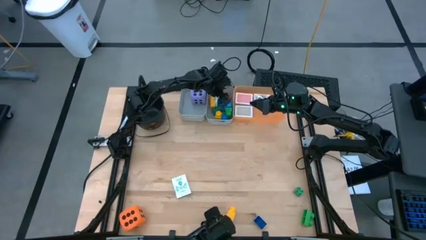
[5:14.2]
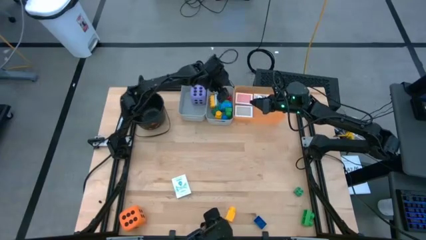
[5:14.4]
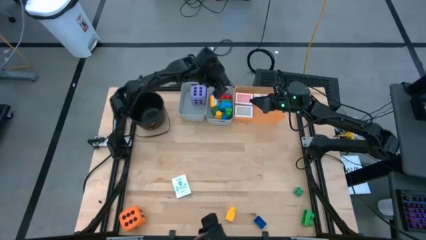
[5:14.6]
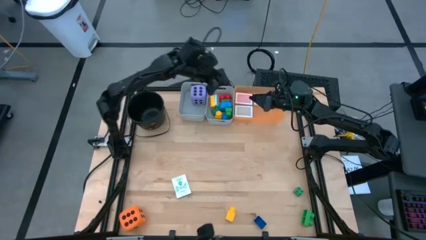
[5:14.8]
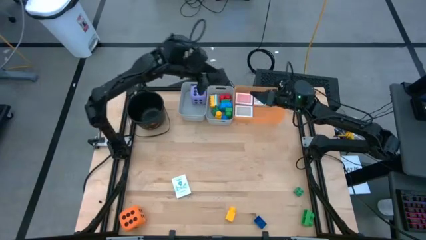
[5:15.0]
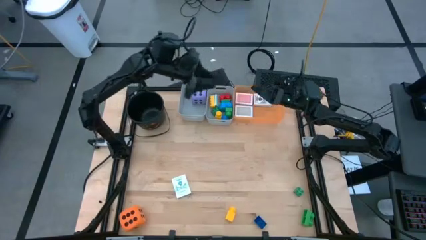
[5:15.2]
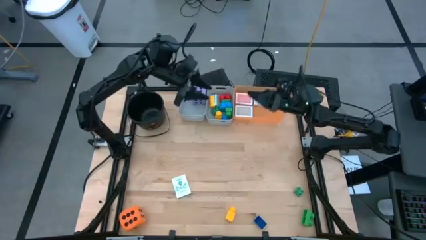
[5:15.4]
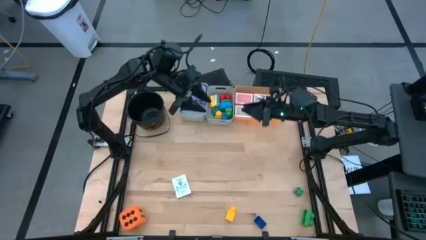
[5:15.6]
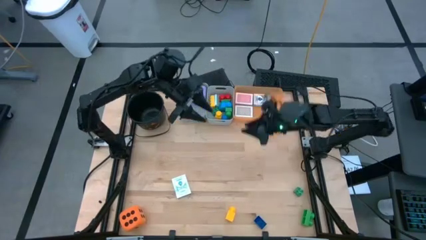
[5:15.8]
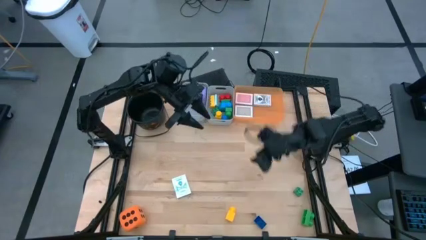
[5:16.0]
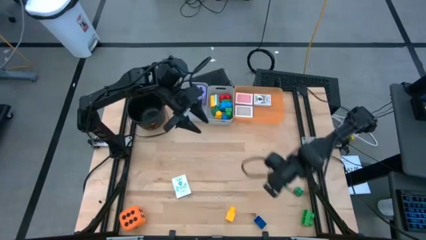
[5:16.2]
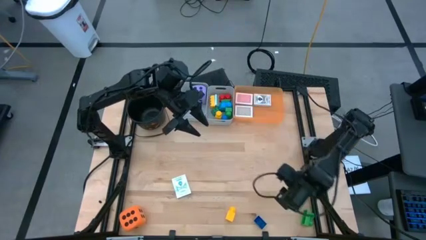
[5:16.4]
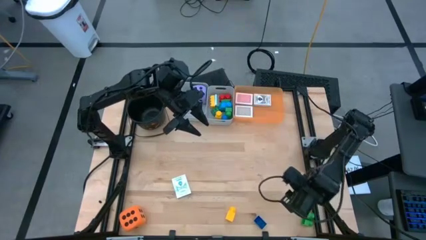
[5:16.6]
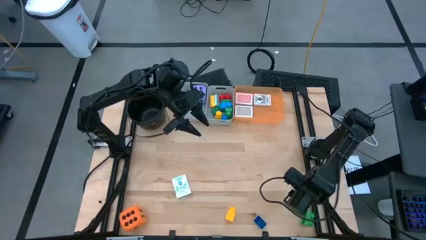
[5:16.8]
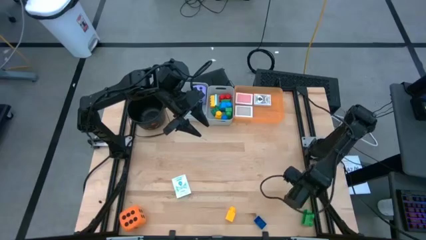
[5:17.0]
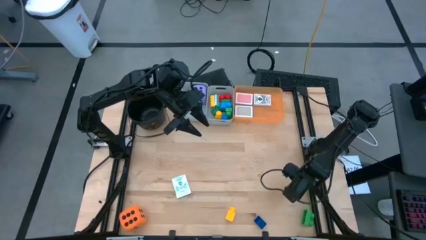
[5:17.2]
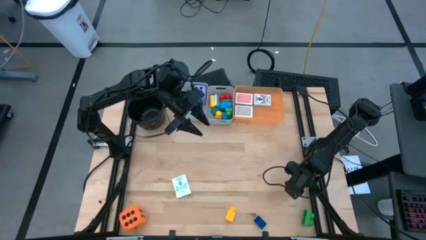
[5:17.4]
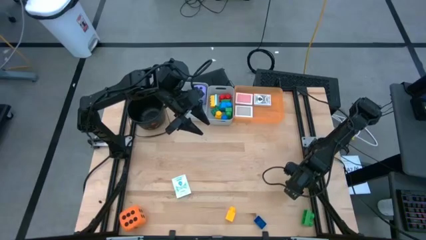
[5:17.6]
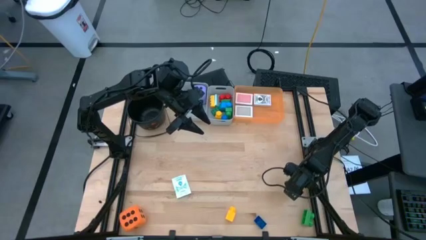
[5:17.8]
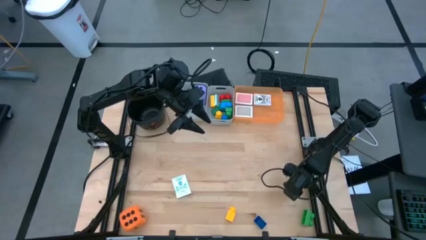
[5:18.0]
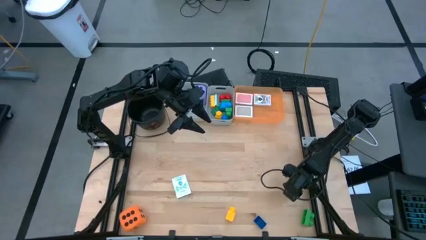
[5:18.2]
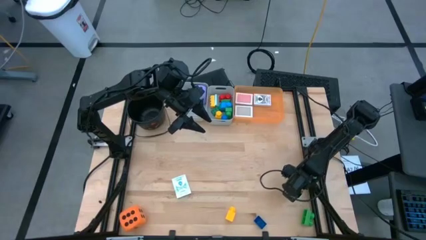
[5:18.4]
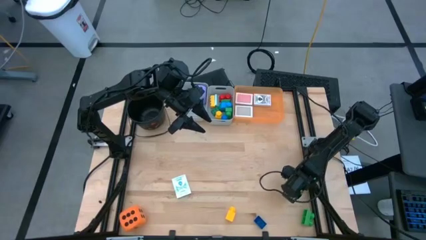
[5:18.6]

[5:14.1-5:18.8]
Task: Pick & Place Toys
Put the green gamepiece into the right gray bin

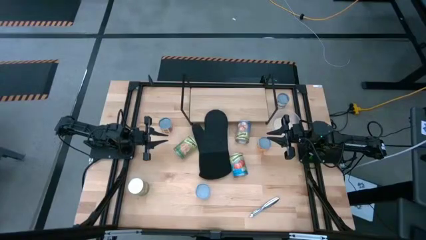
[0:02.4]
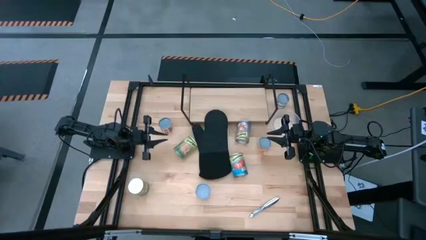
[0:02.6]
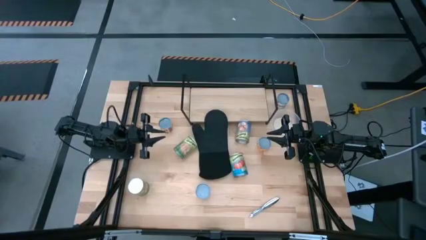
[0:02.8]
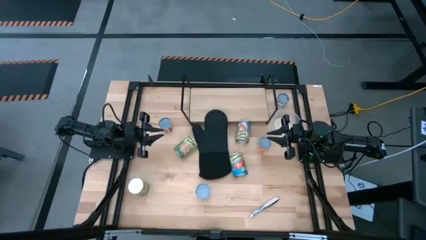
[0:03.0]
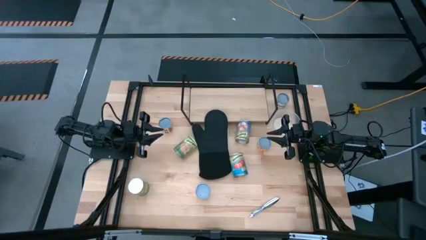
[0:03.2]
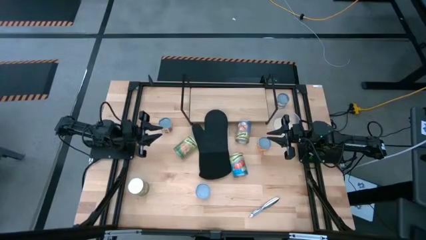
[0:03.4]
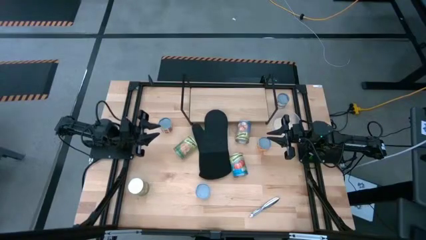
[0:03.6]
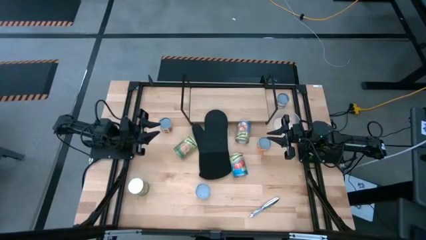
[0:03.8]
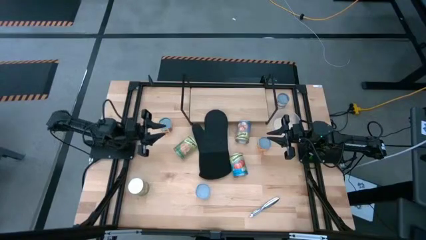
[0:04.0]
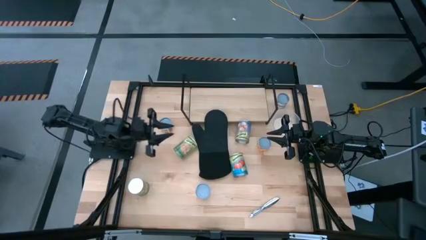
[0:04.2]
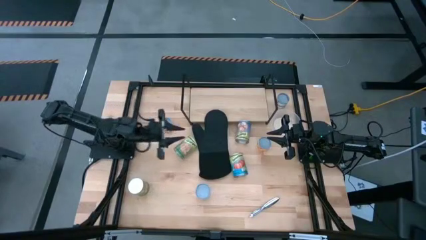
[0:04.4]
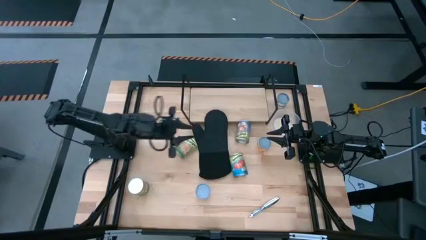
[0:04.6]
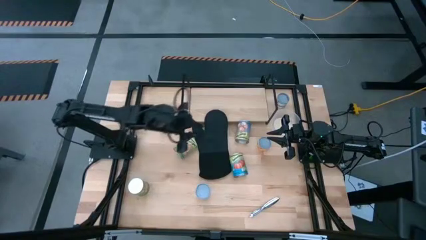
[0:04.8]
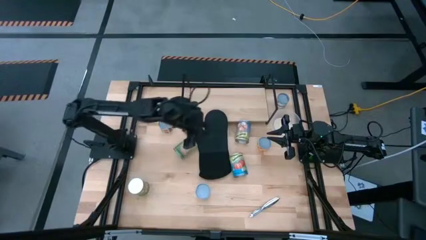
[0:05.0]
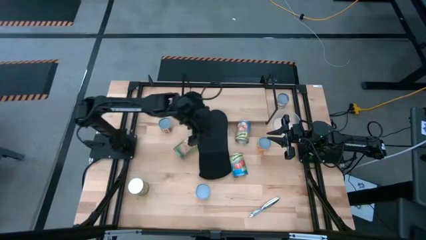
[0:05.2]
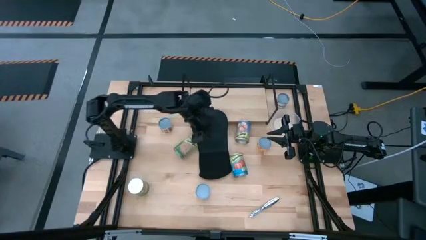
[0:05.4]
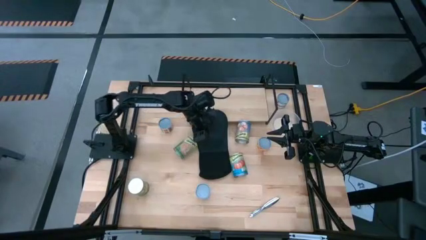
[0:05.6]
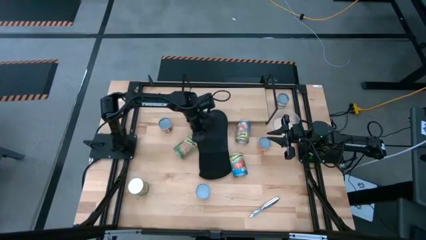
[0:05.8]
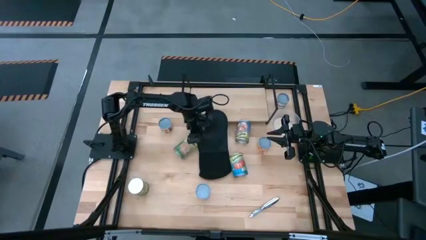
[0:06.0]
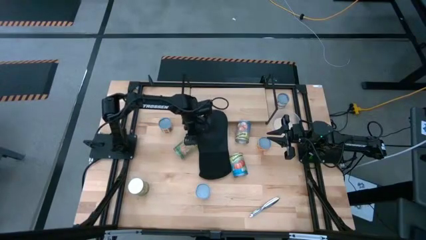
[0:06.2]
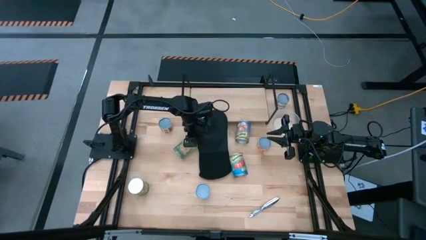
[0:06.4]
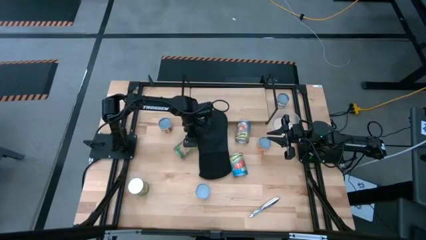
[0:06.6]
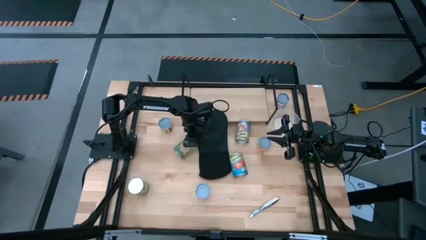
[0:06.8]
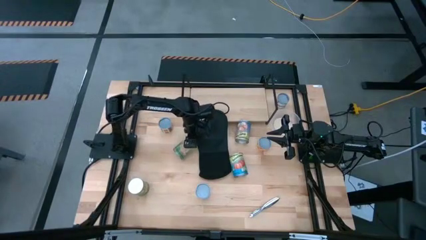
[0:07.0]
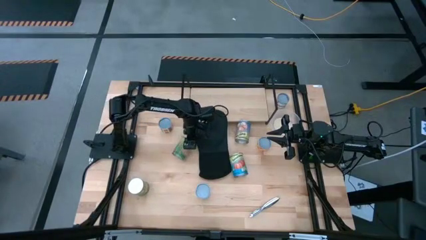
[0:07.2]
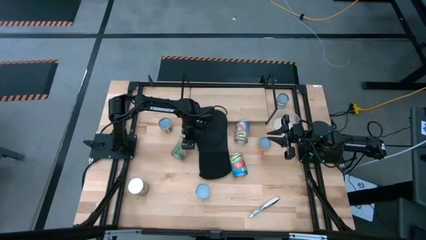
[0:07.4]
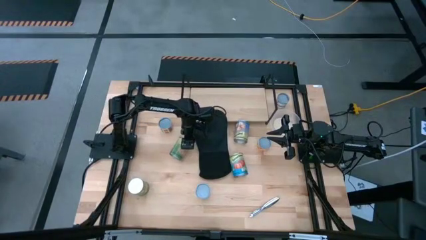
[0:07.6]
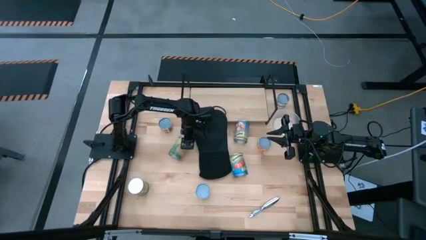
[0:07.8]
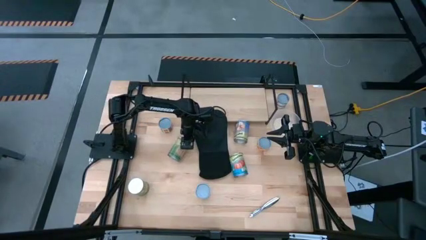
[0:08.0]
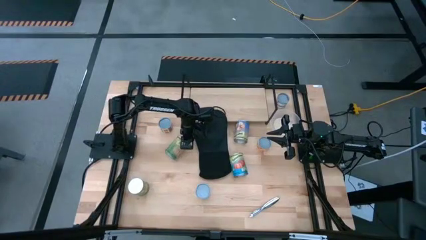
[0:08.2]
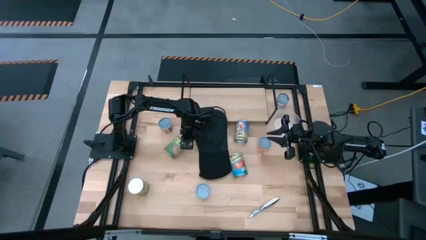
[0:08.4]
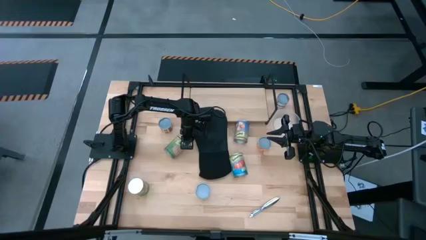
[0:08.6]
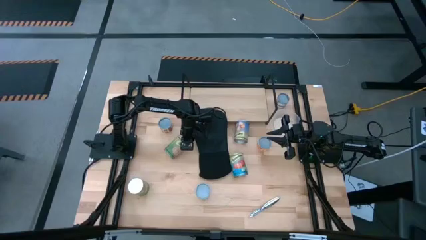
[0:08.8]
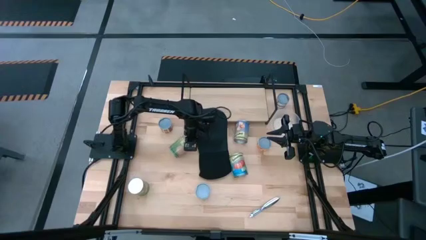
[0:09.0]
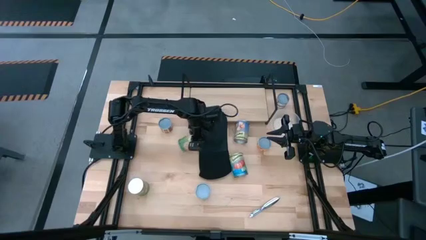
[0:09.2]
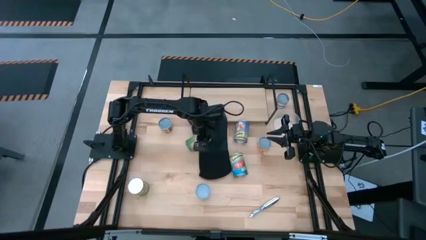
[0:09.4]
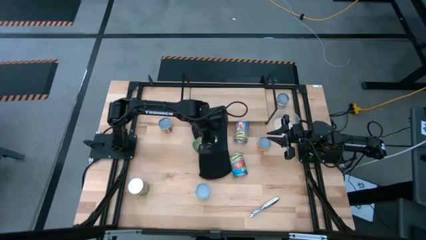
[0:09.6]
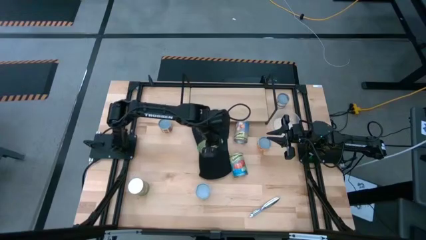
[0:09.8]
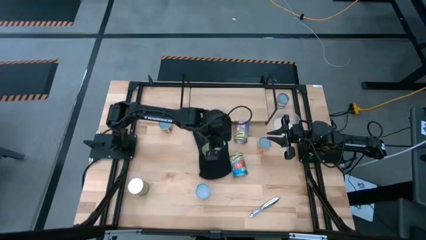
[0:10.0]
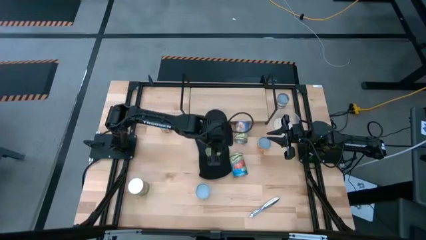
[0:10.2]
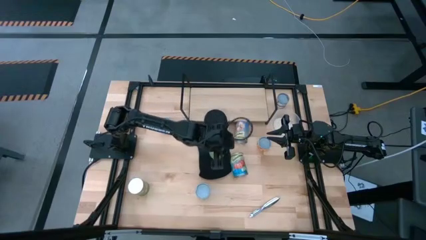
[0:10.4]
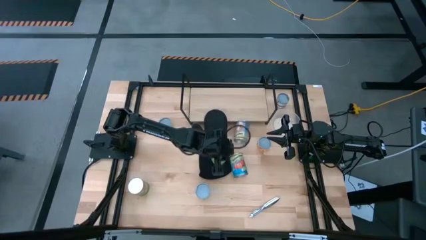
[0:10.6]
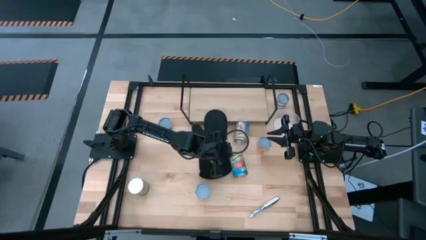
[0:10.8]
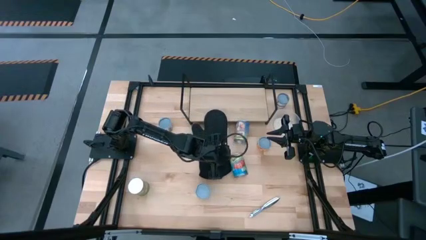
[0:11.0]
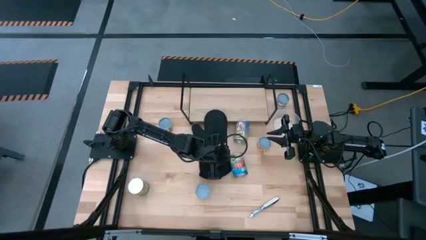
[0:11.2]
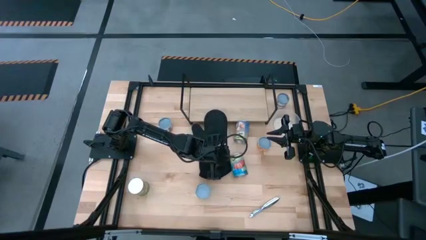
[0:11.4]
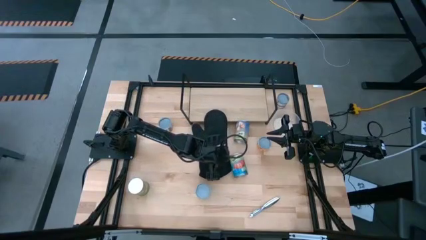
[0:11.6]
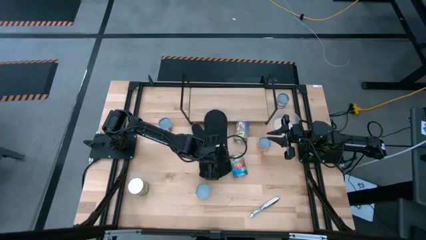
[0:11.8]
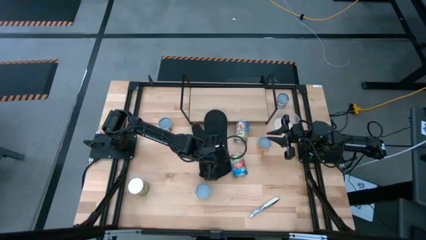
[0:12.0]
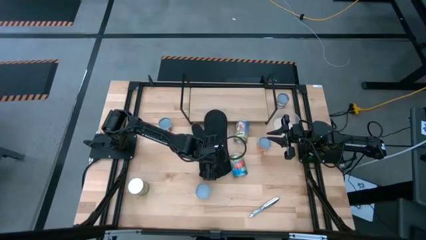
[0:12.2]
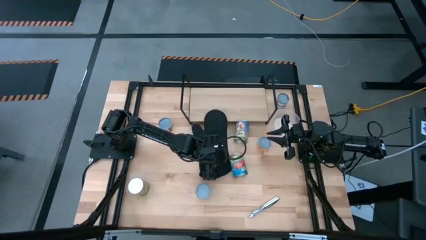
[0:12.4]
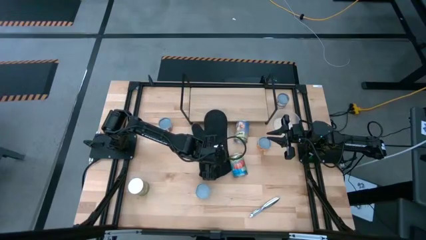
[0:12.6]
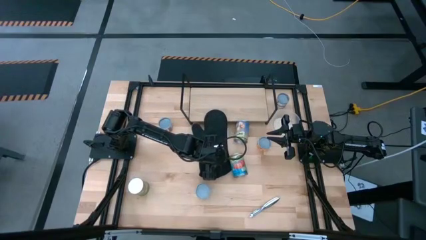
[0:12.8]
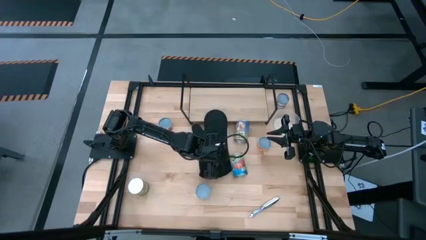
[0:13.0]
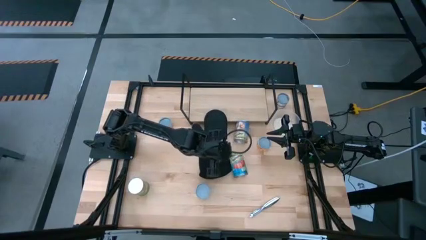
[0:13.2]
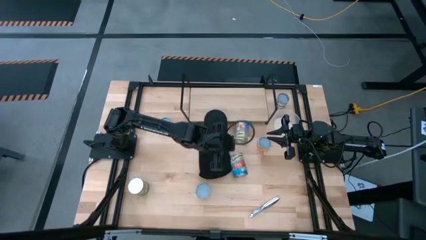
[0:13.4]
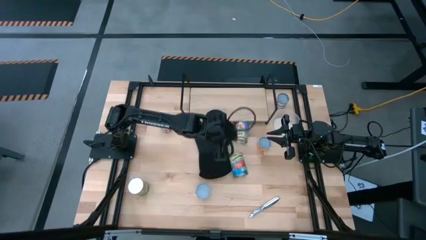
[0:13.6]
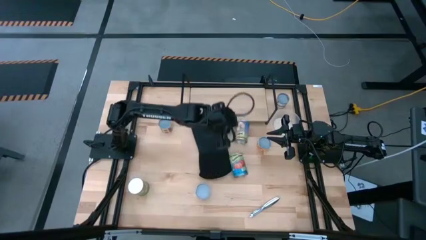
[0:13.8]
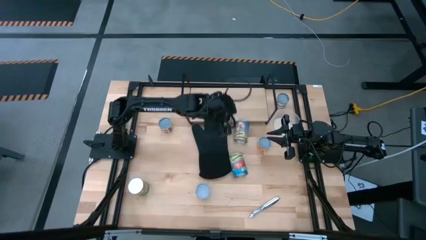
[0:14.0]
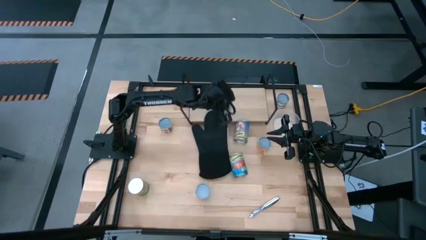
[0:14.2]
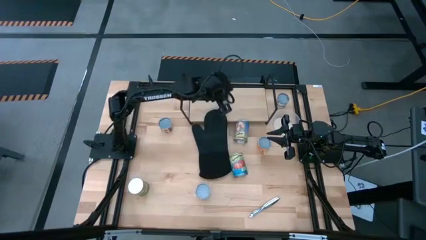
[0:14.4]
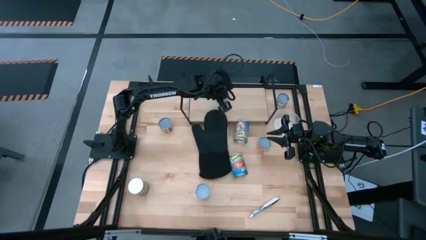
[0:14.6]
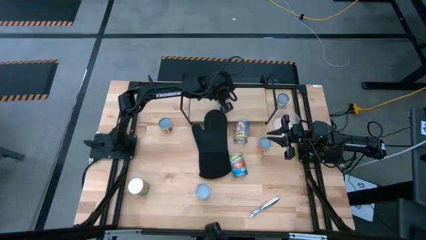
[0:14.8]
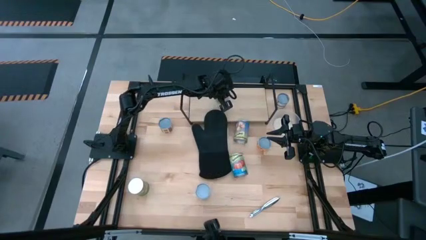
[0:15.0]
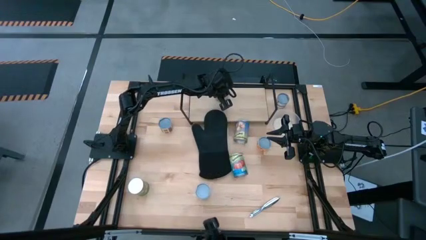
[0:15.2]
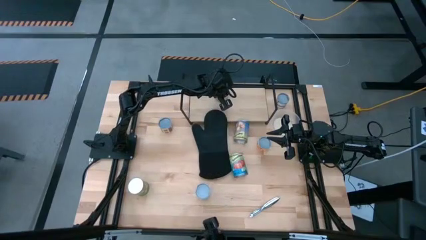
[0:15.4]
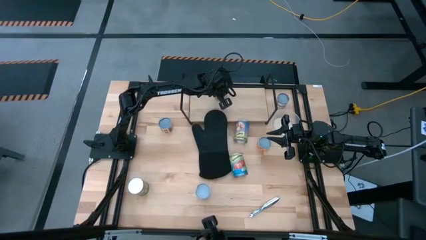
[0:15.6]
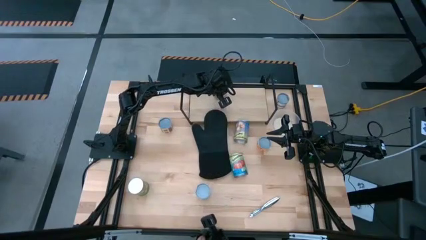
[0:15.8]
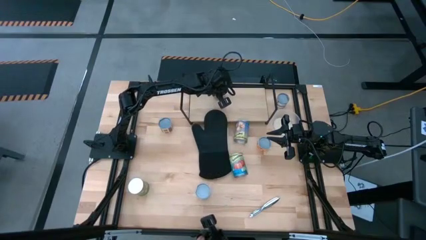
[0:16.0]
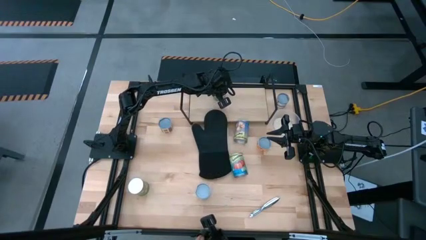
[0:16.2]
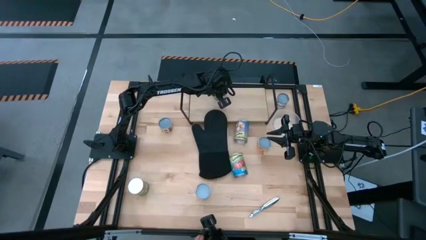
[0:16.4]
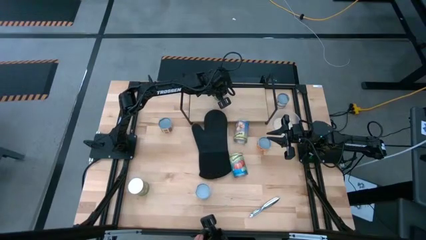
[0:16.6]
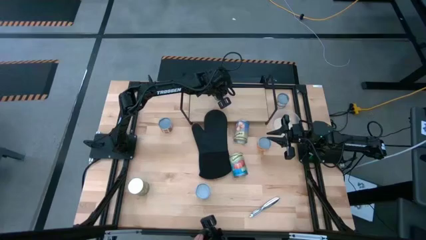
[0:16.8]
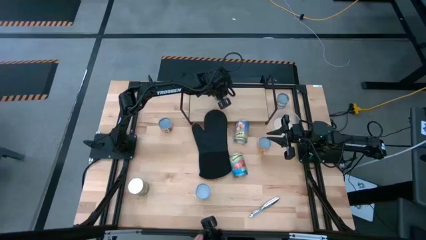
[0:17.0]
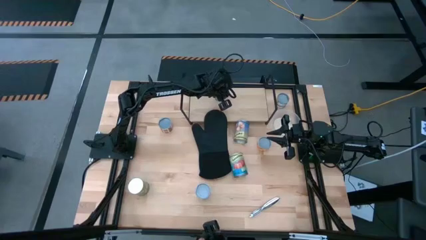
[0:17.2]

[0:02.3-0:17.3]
Task: Pick and place cans onto a shelf
Put the large canned oranges on the shelf
